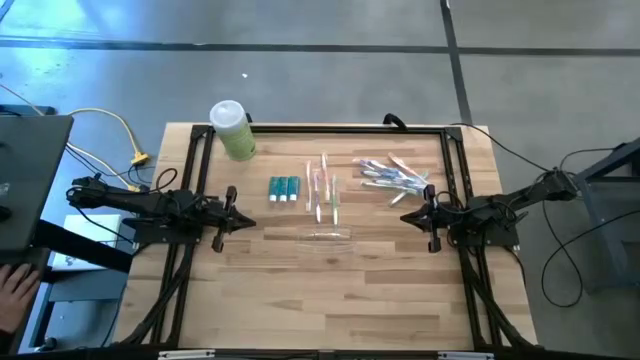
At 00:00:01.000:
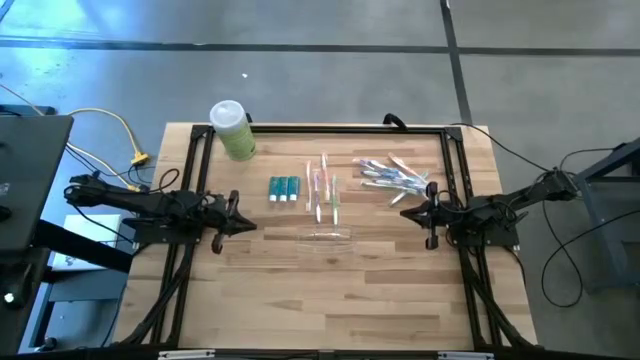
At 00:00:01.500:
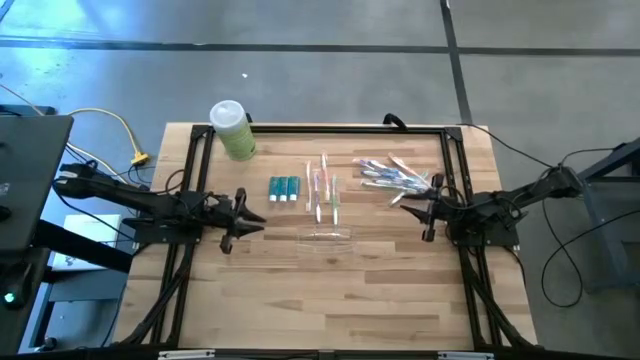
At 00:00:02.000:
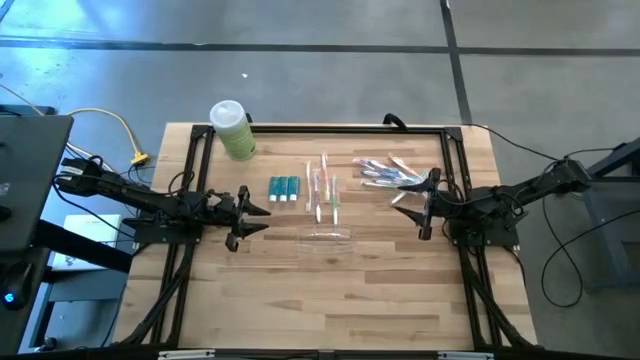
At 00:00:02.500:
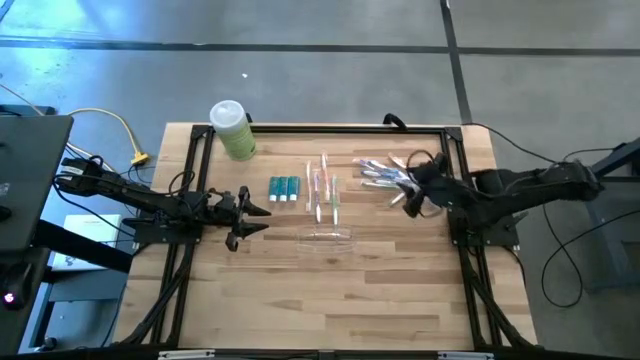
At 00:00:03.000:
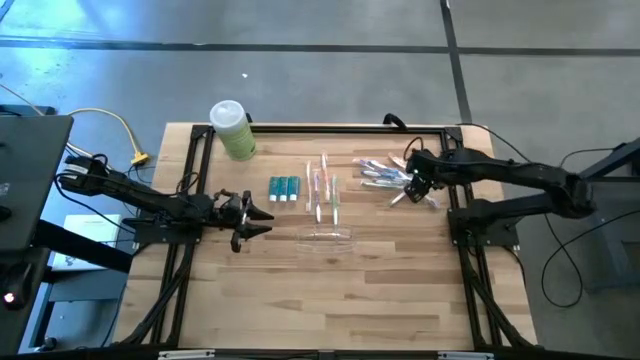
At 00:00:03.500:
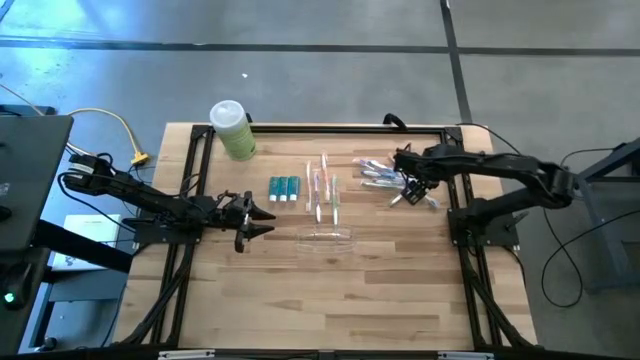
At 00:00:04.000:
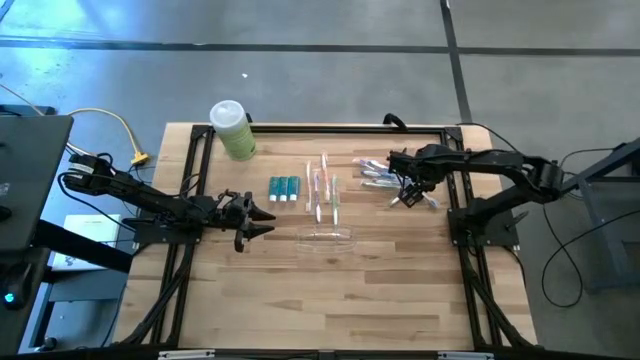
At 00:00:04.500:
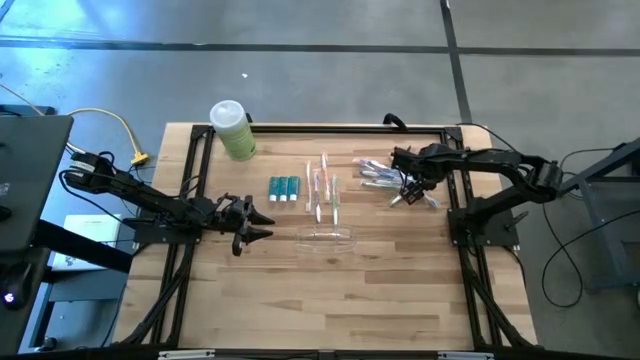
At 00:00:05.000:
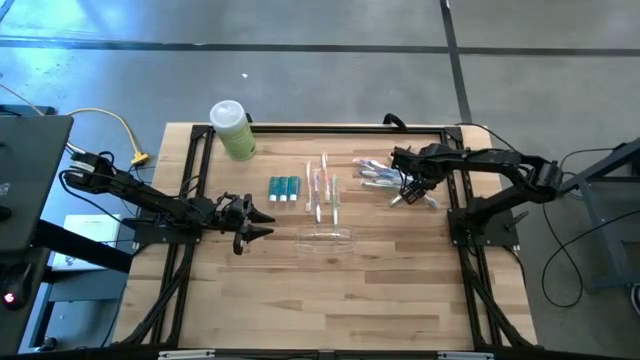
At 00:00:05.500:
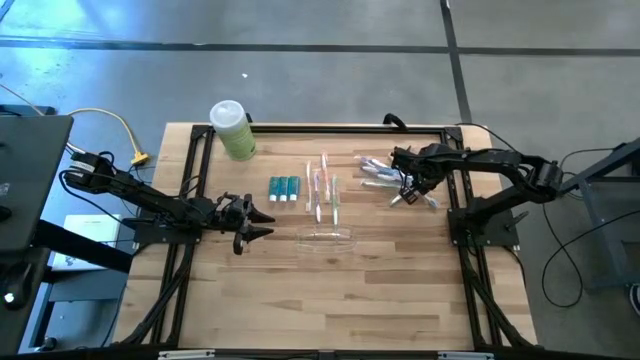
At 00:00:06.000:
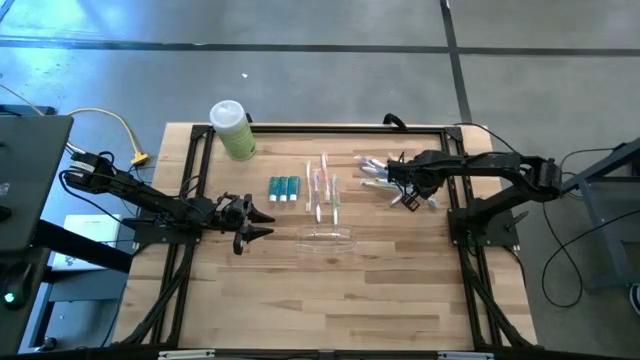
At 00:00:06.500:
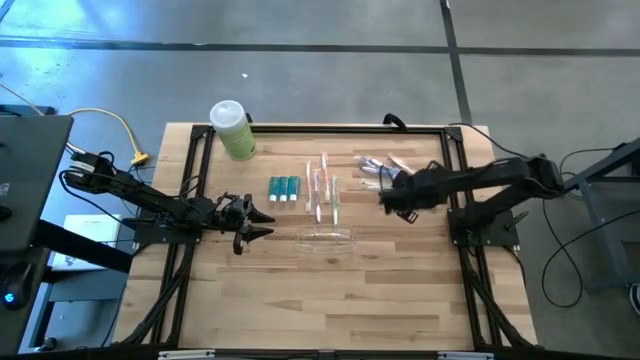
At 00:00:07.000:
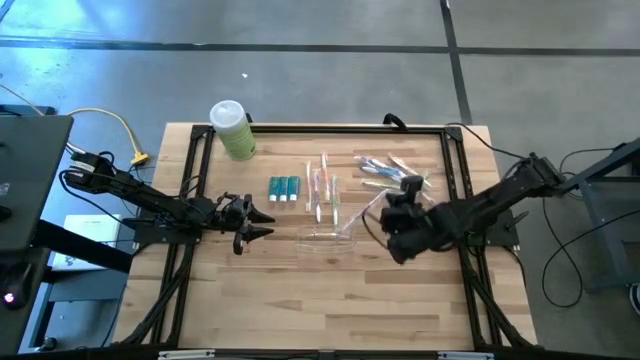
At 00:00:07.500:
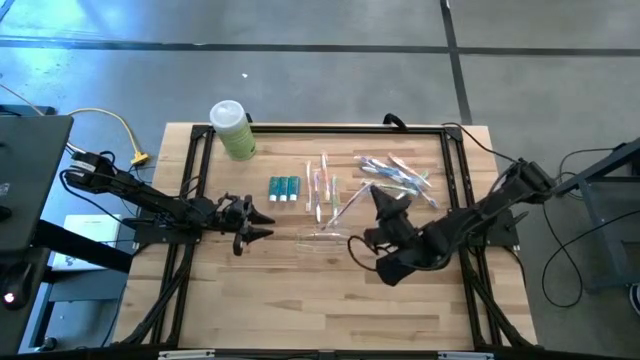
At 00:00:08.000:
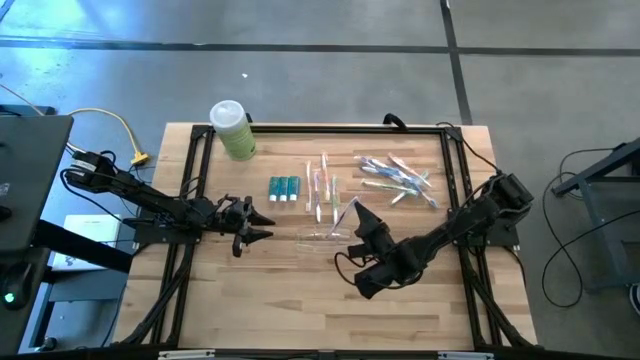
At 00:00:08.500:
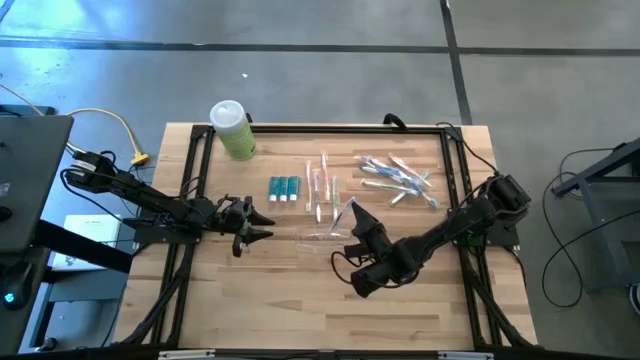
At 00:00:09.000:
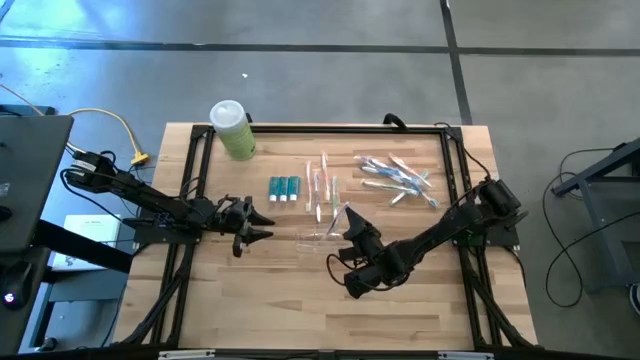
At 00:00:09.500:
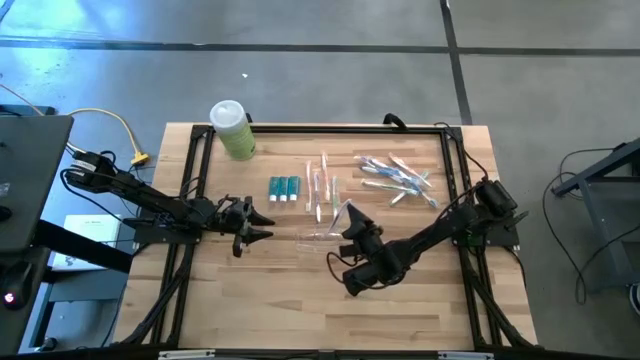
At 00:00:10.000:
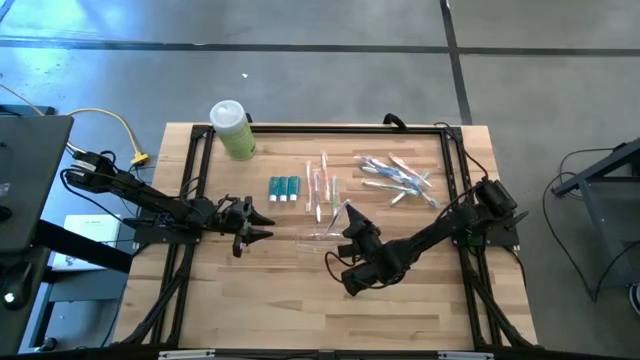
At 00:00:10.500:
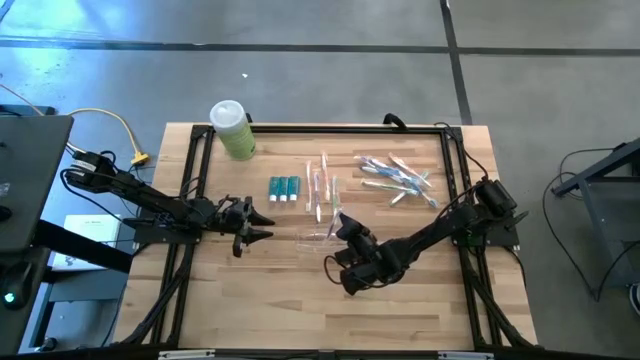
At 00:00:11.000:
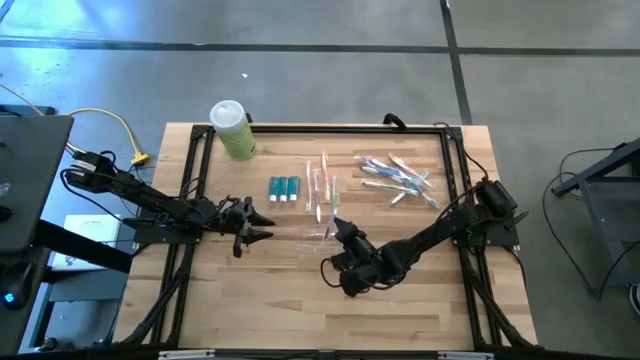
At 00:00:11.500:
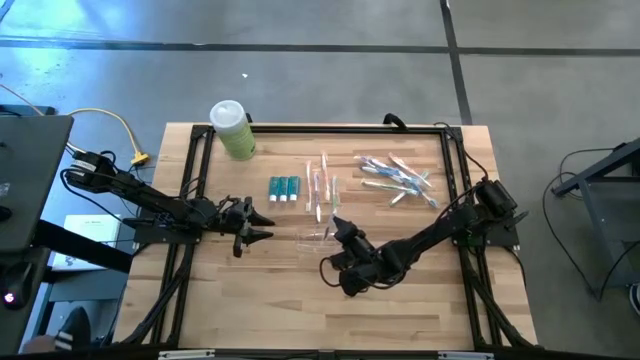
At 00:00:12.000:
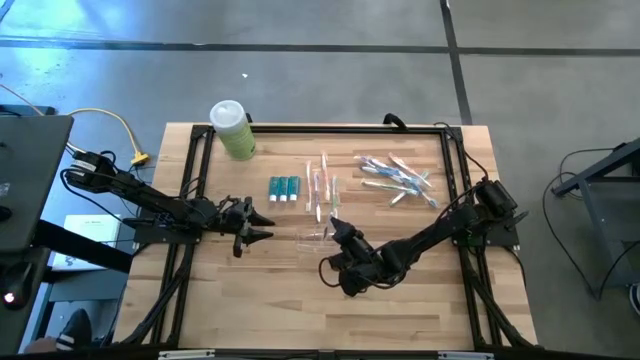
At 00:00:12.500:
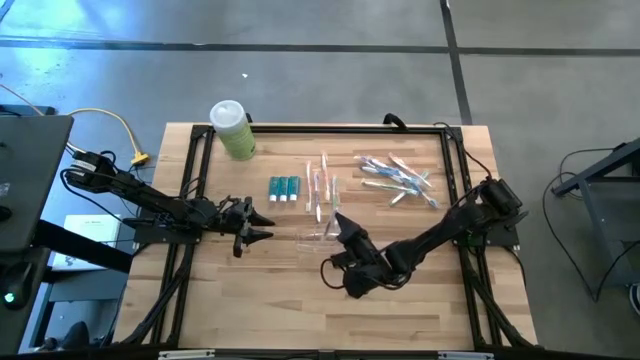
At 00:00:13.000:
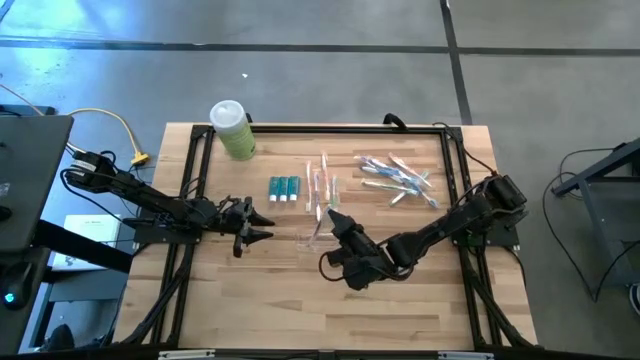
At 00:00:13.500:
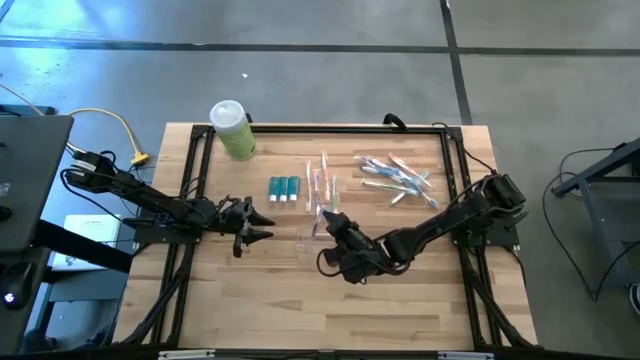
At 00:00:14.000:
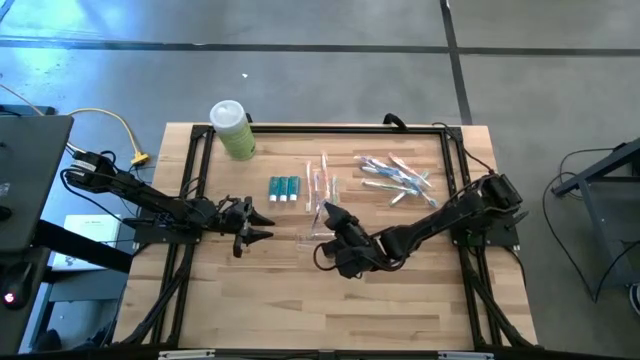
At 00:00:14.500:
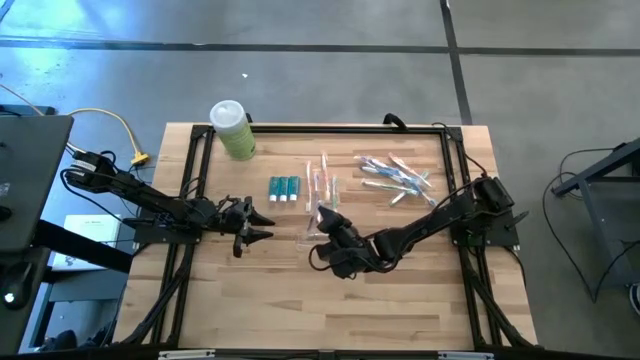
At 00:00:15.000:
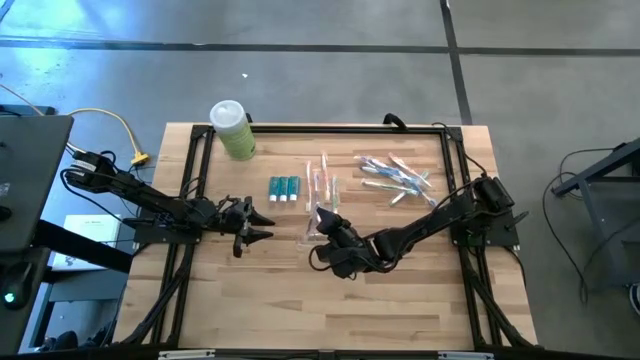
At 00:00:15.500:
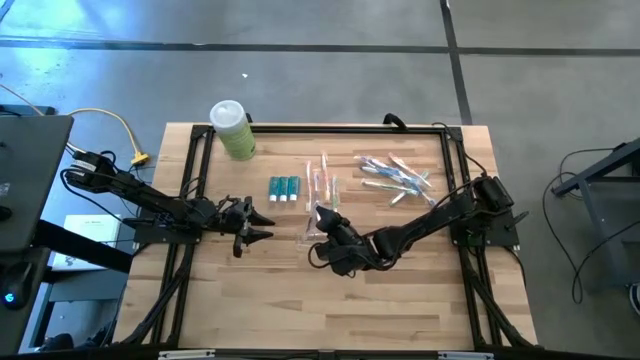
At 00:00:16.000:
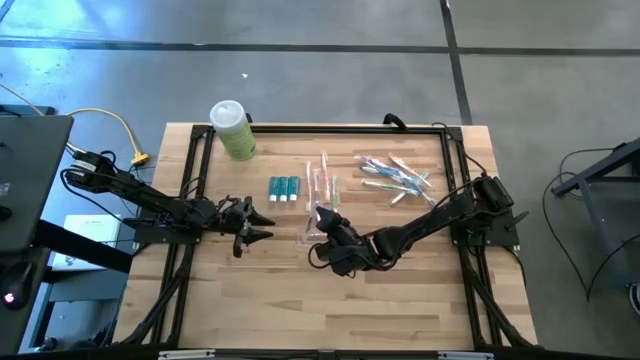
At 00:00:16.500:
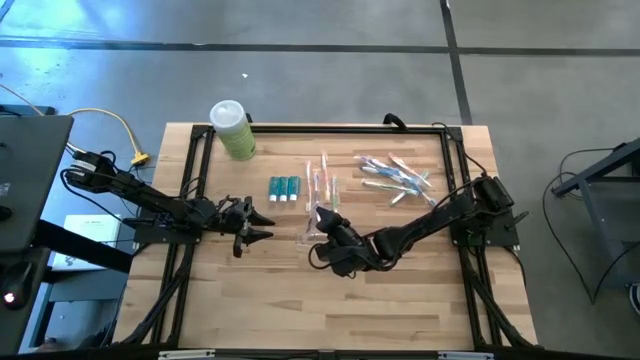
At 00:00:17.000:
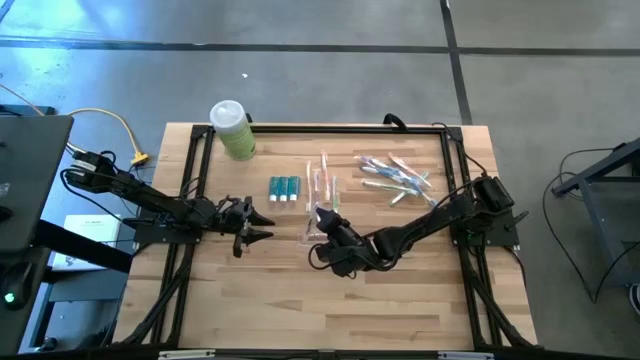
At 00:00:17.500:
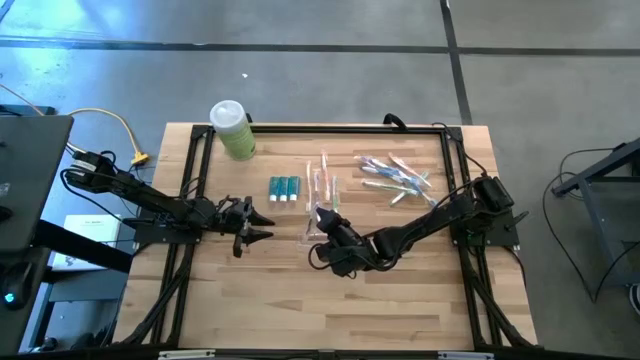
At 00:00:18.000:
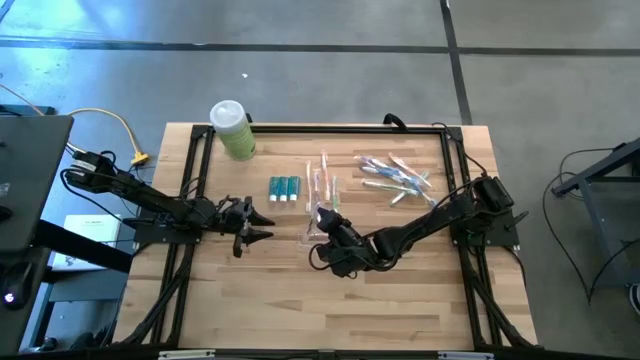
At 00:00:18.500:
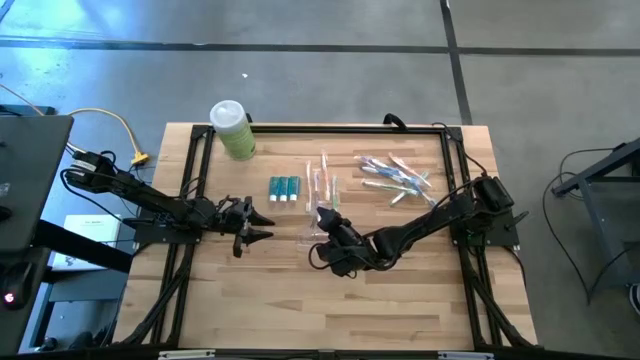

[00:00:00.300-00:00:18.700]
Task: Pick & Place toothbrushing station
Put the violet toothbrush into the transparent organizer

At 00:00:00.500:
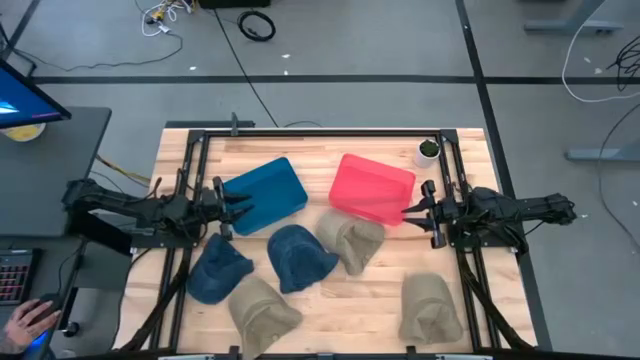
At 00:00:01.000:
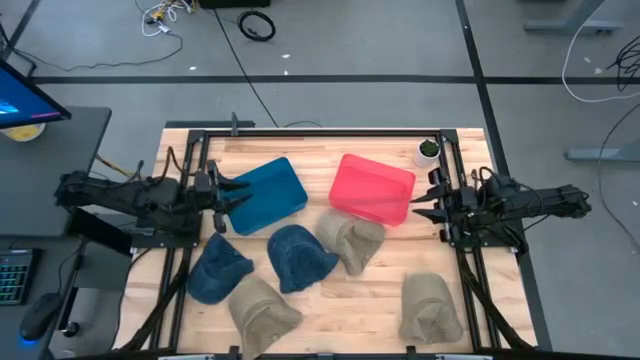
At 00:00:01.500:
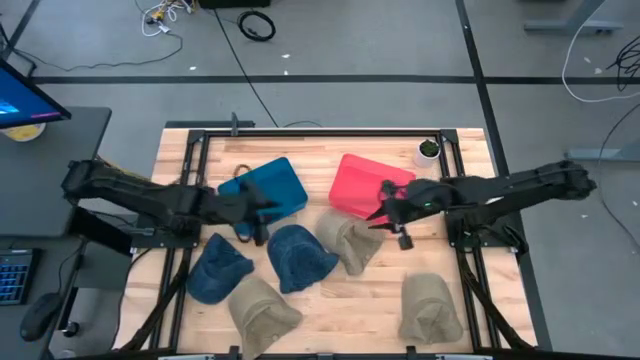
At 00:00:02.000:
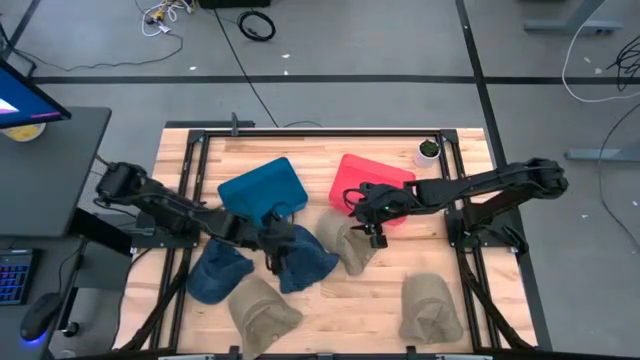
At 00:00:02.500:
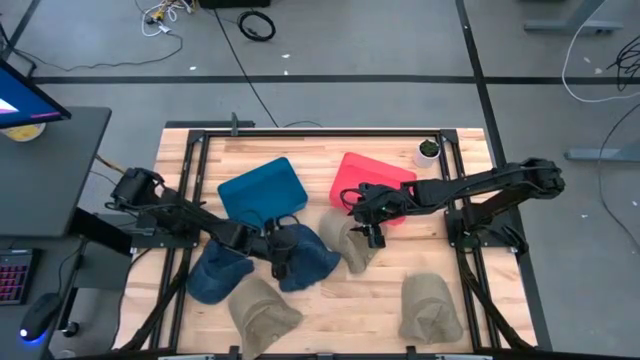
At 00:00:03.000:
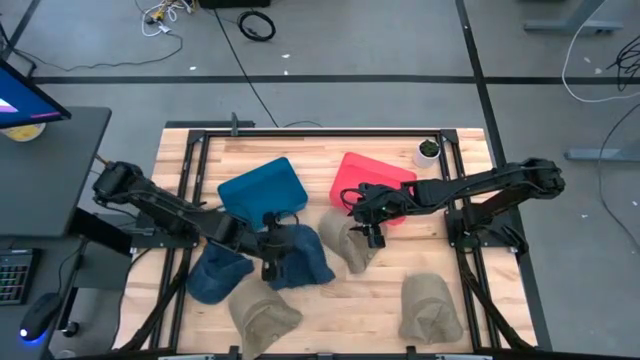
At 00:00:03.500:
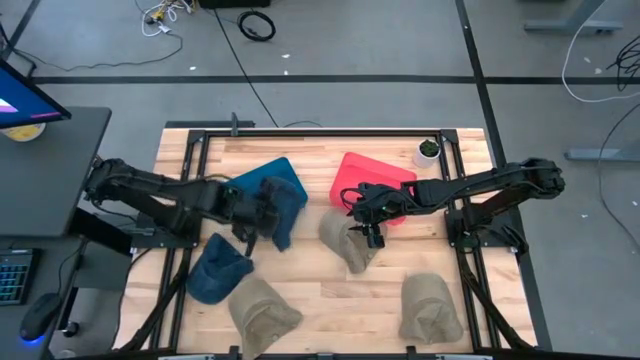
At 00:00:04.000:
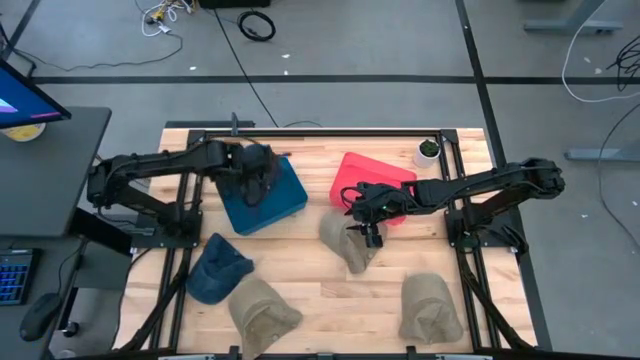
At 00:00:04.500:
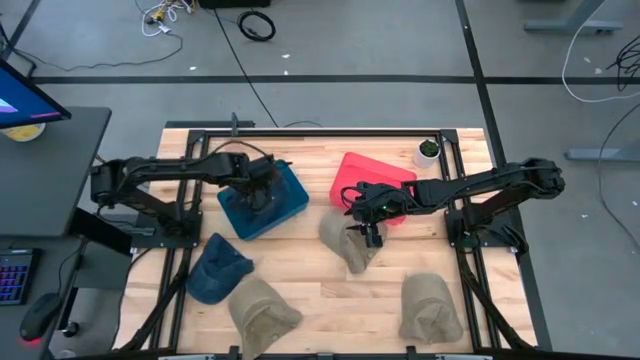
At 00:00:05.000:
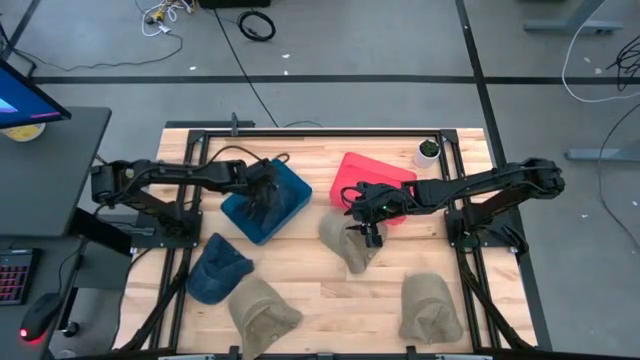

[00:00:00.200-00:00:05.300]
Task: Pick & Place hat
Put the right blue cap into the blue bin
